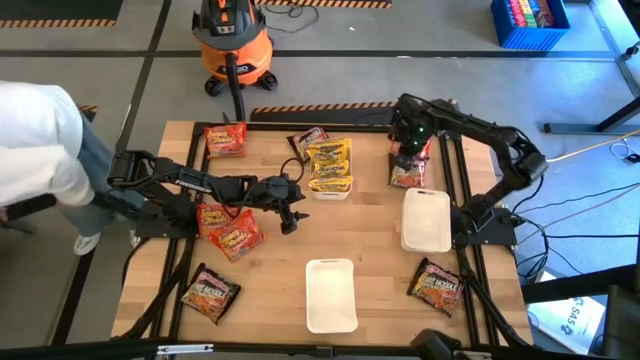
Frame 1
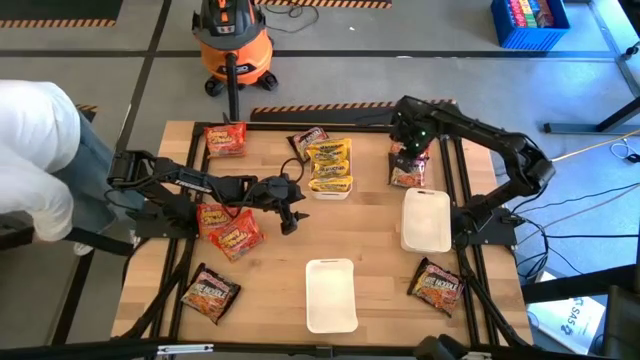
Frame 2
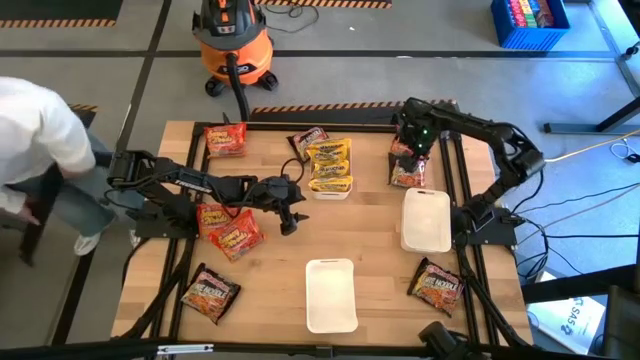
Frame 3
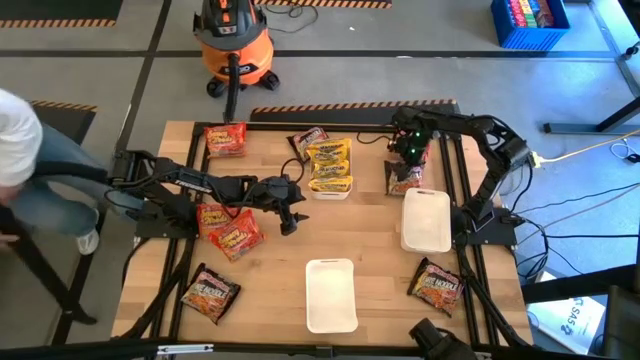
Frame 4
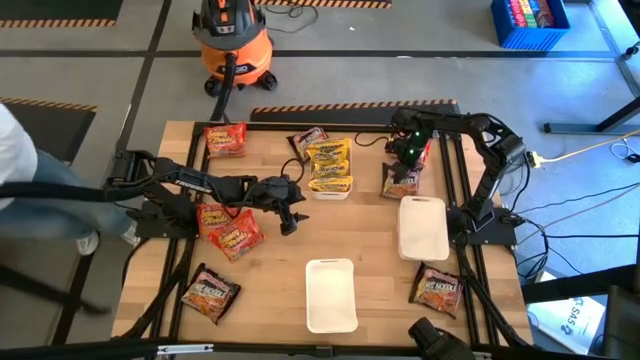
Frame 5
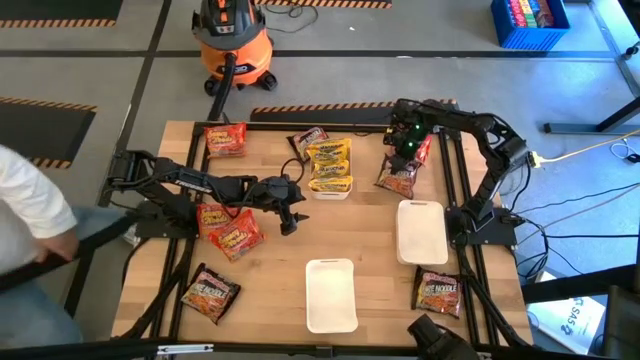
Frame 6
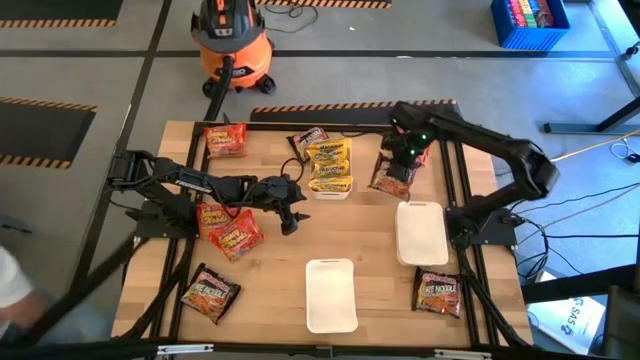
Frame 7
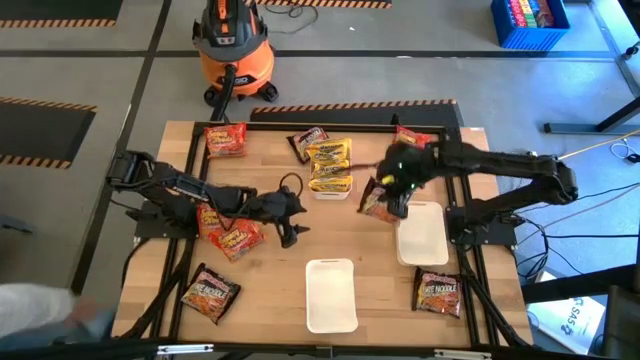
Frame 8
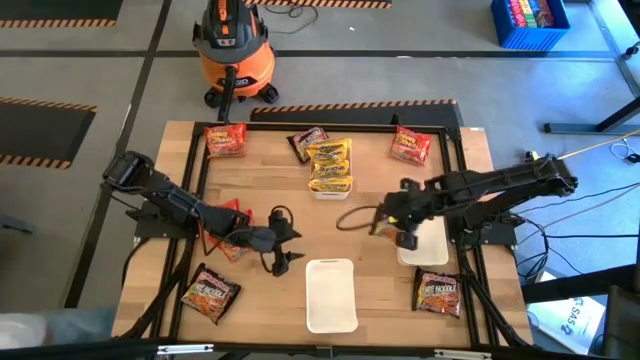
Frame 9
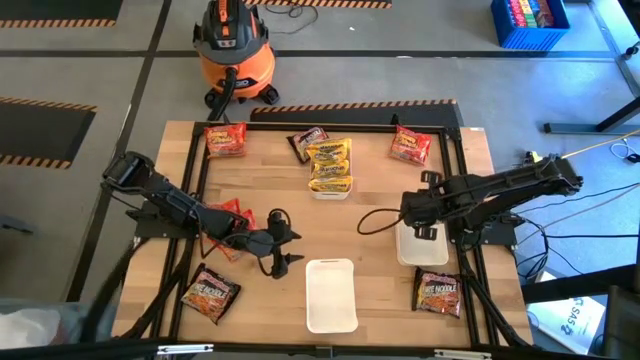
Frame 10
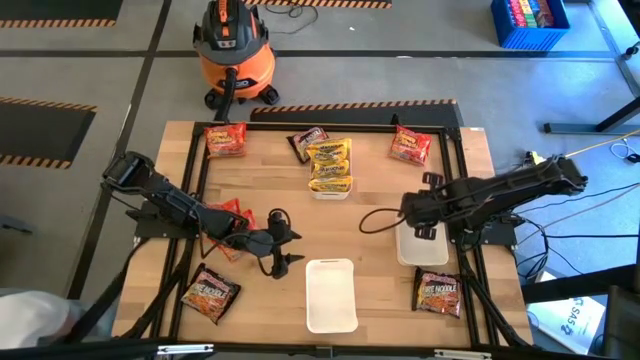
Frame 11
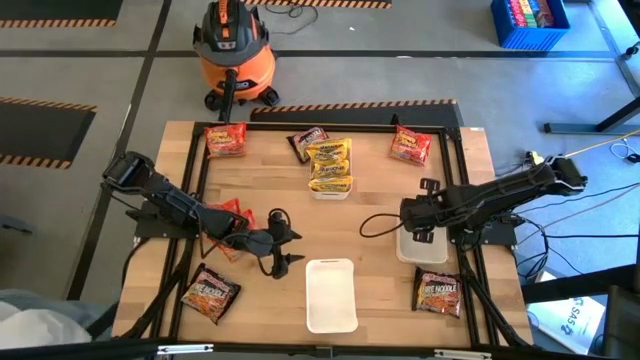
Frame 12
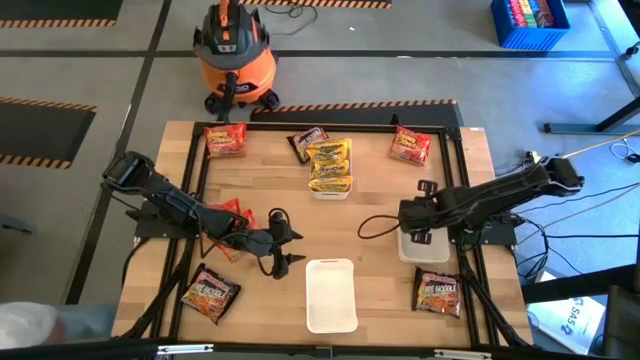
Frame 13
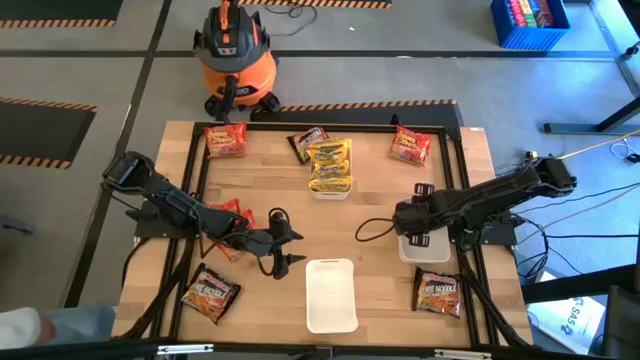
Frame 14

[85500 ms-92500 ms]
Task: Sort Maruchan noodles
Put the top right black noodle pack into the right white bin

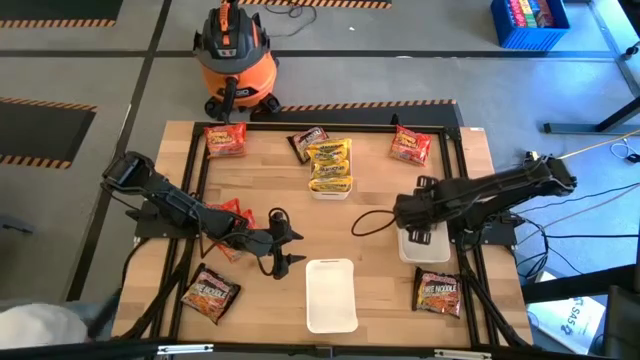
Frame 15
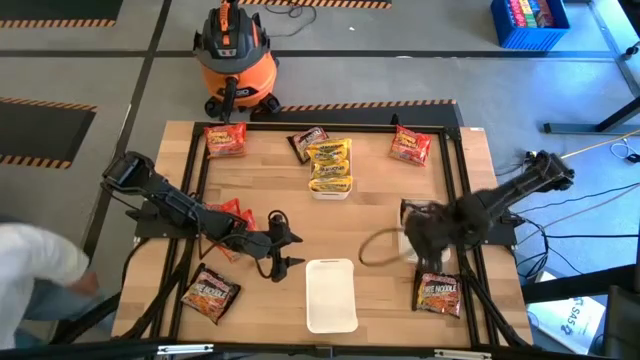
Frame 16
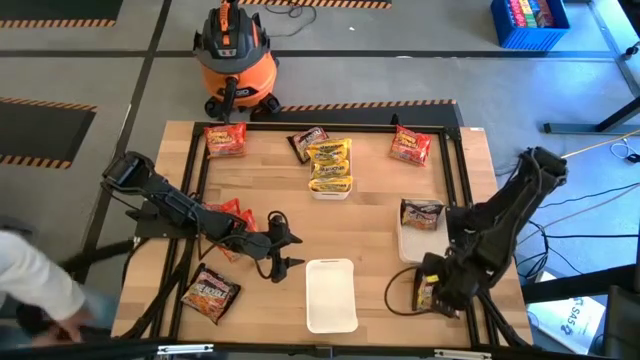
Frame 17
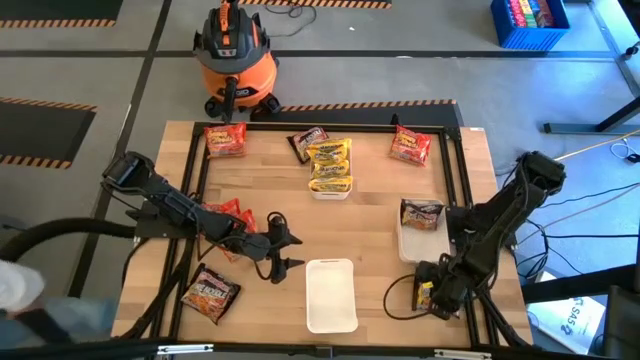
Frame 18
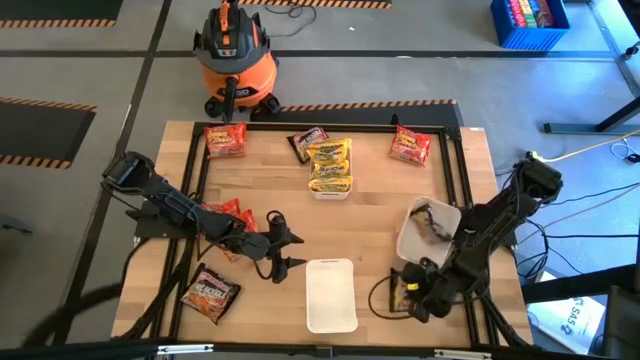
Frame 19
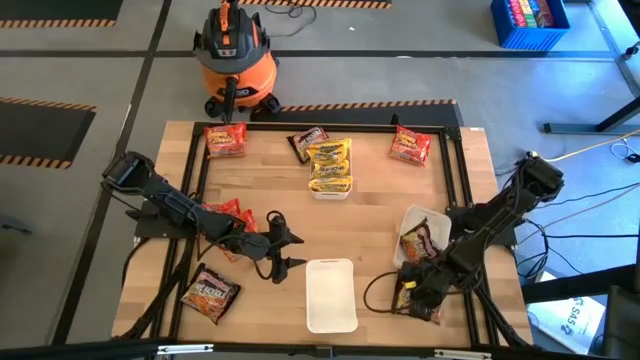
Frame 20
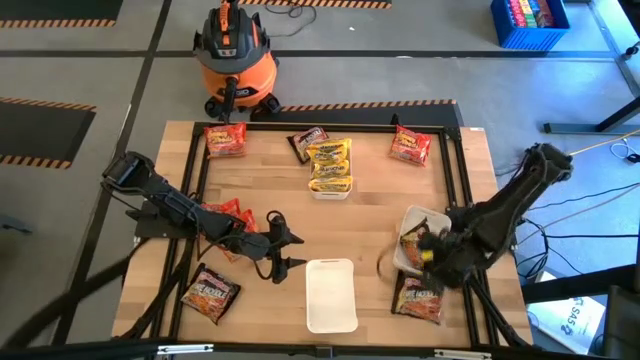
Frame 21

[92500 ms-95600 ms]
Put the bottom right black noodle pack into the right white bin

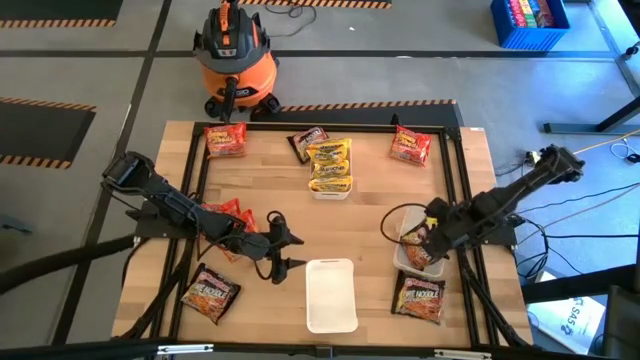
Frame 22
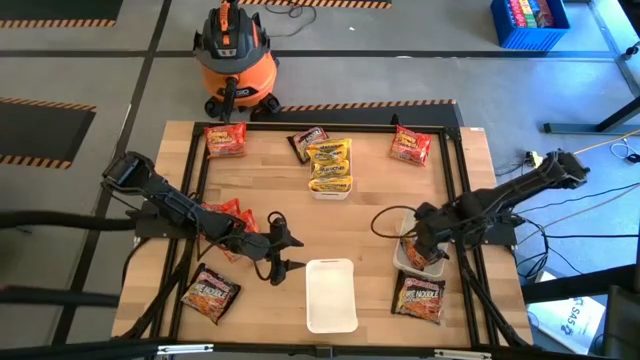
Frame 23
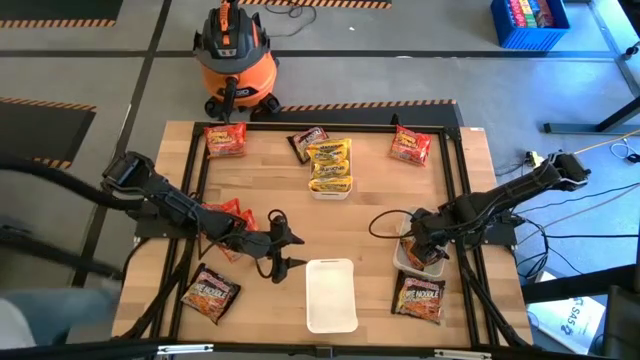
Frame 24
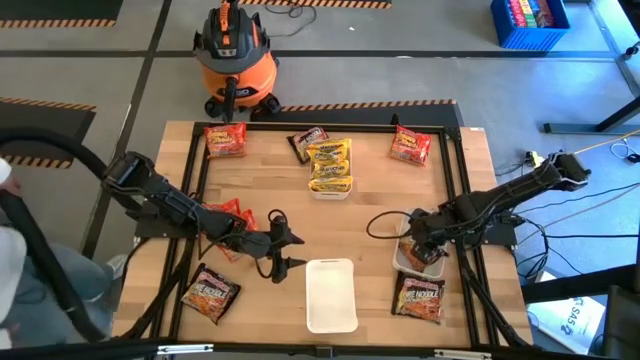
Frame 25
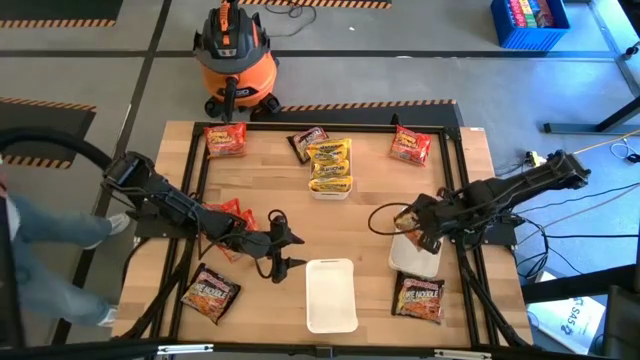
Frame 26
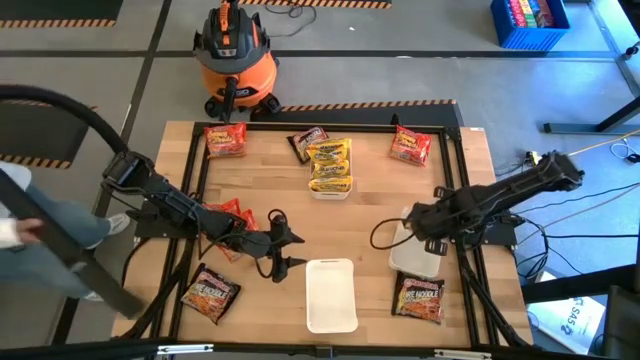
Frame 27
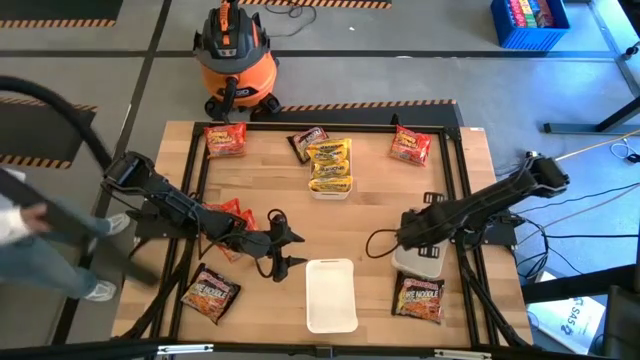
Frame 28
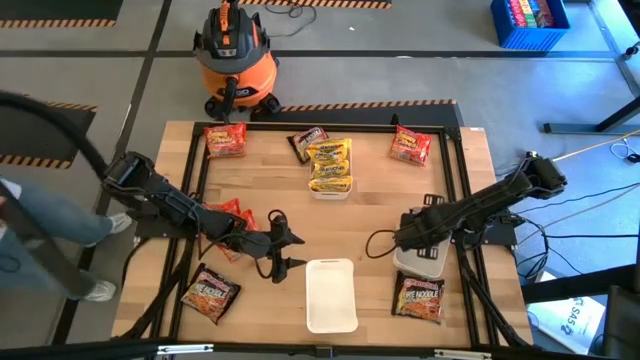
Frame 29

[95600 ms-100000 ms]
Adjust the black noodle in the right white bin

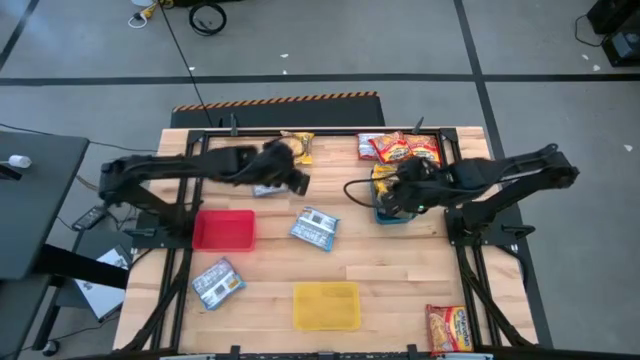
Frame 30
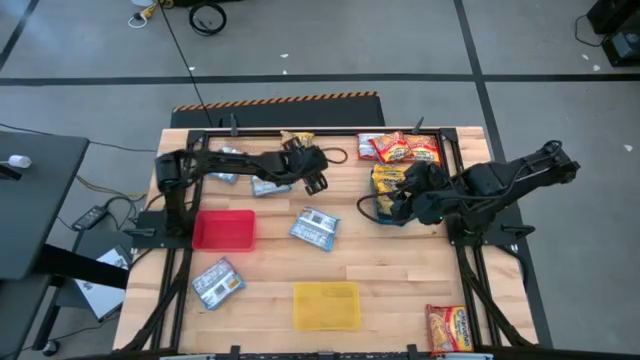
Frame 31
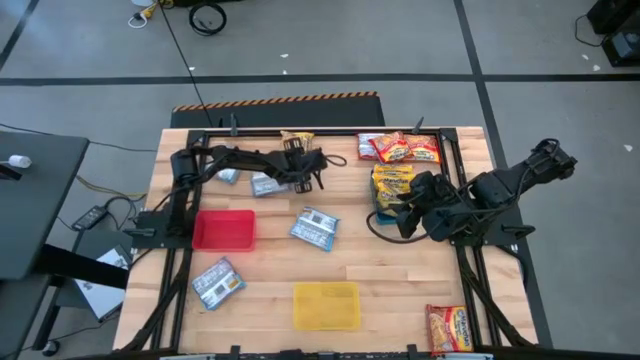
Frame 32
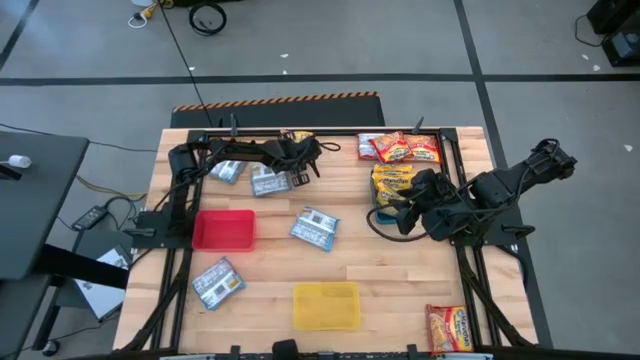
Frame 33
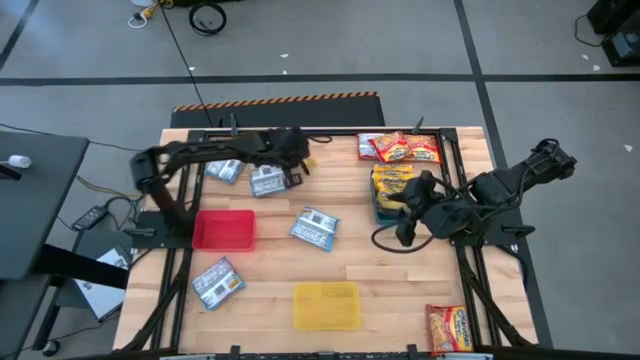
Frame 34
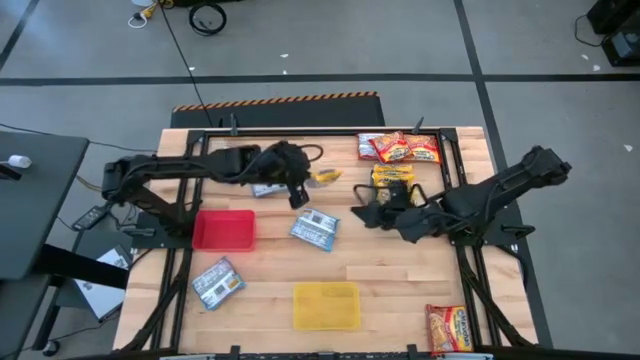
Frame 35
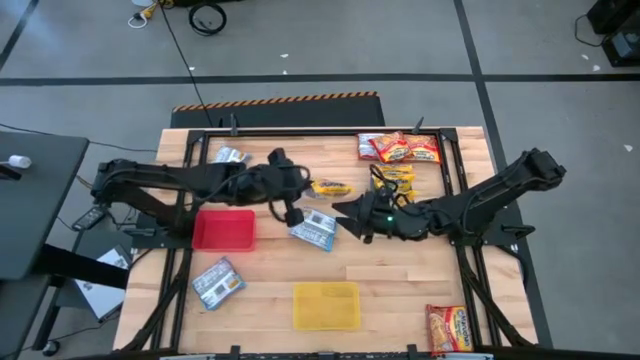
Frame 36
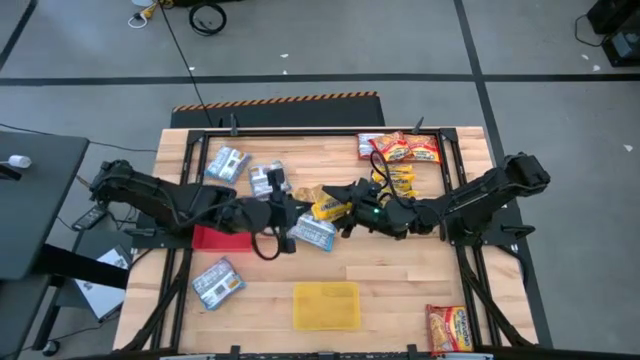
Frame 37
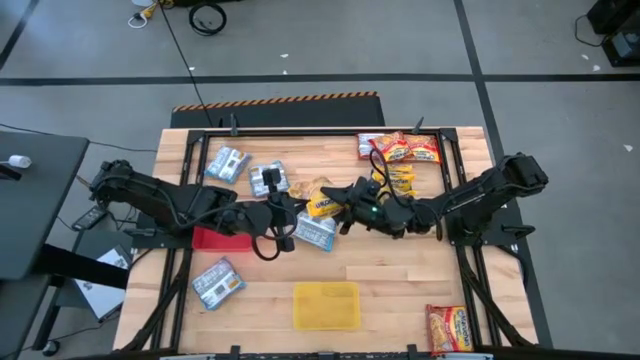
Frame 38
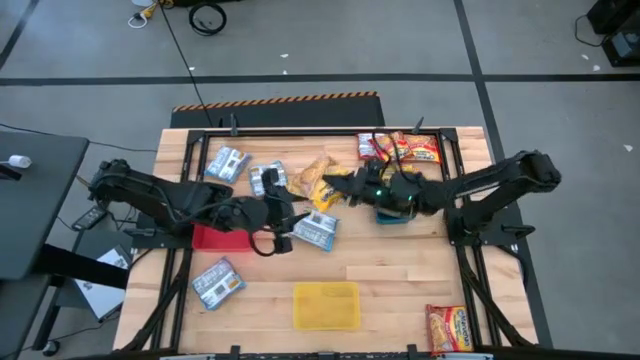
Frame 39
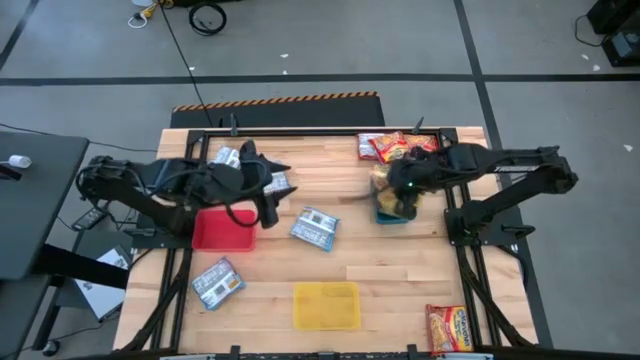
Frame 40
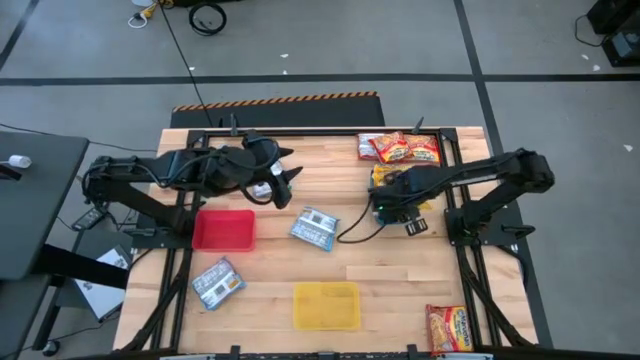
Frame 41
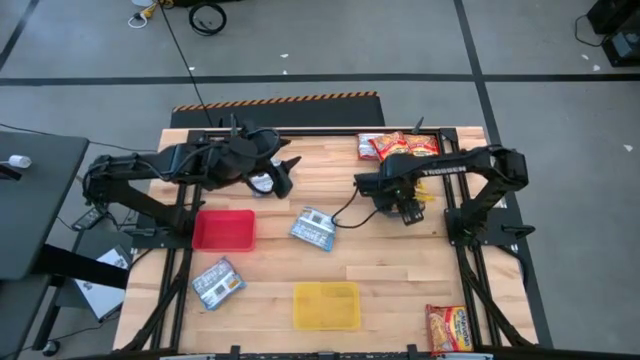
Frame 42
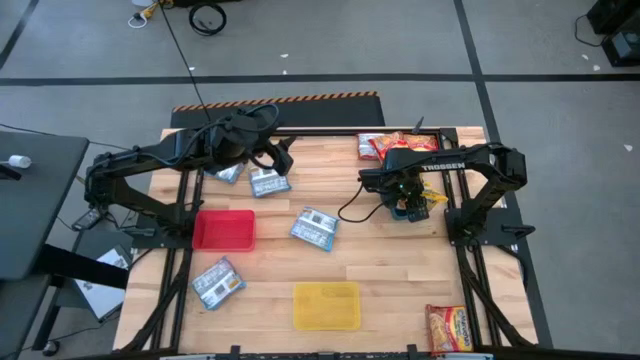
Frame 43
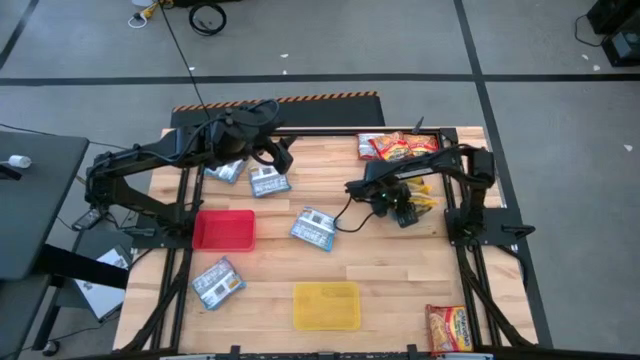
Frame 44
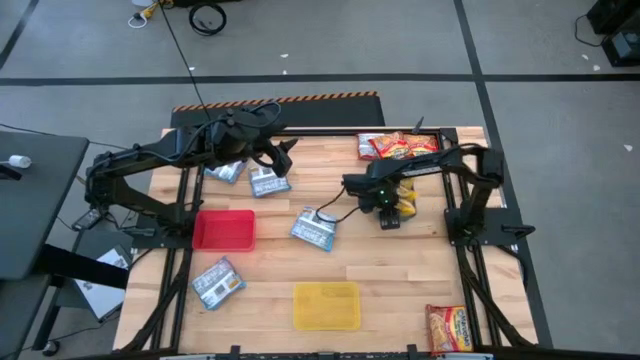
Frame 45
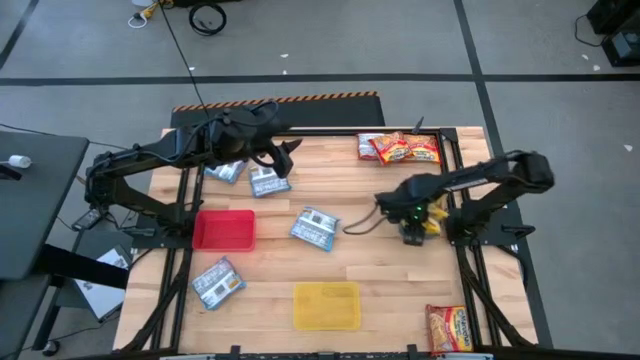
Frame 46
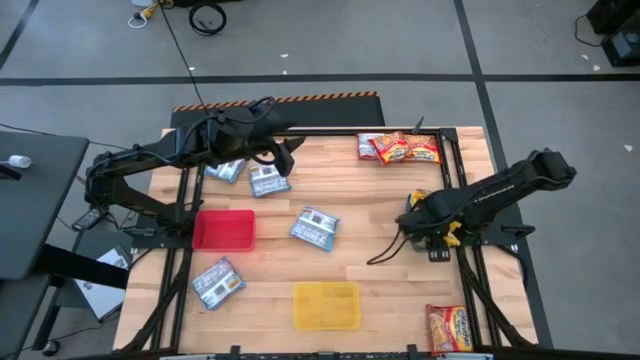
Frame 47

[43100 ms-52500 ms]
Task: Sort Maruchan noodles
Put the yellow noodle pack into the blue bin
